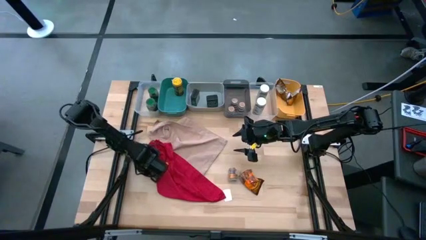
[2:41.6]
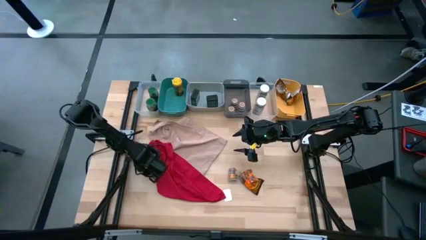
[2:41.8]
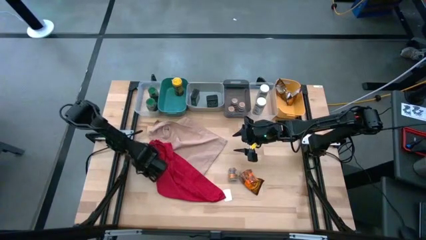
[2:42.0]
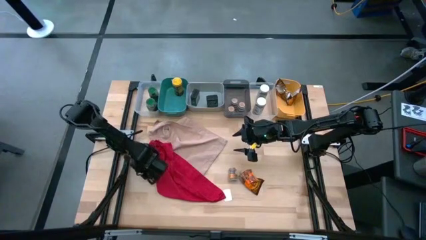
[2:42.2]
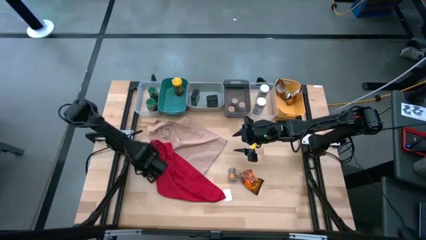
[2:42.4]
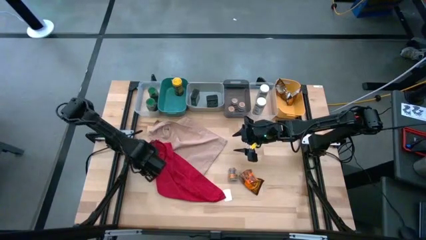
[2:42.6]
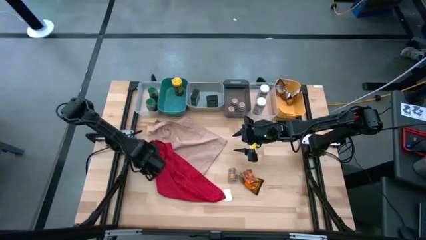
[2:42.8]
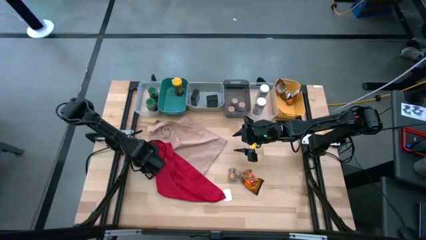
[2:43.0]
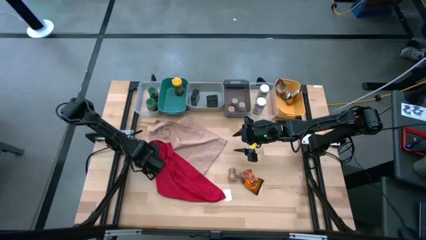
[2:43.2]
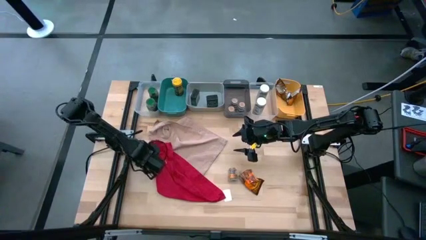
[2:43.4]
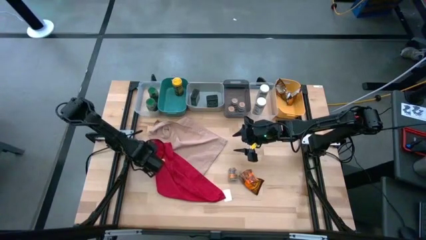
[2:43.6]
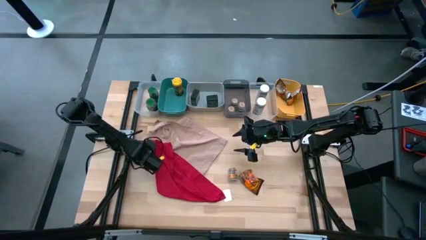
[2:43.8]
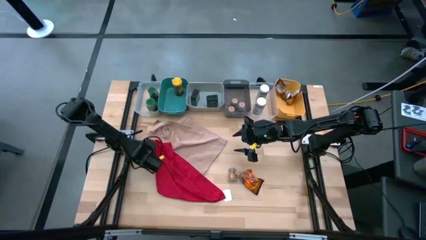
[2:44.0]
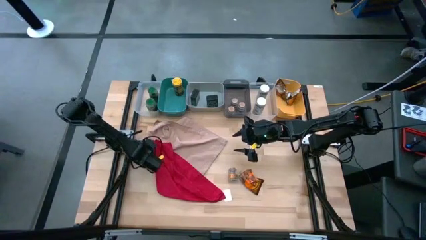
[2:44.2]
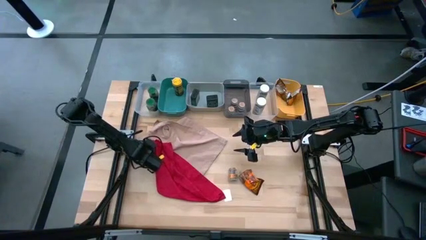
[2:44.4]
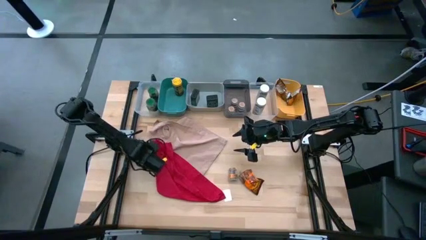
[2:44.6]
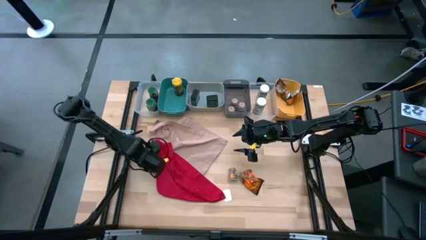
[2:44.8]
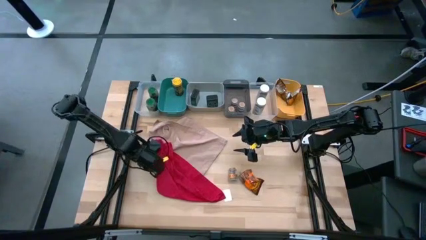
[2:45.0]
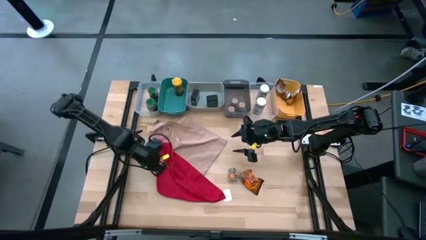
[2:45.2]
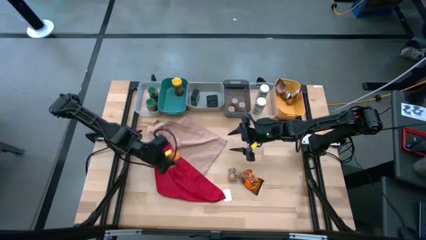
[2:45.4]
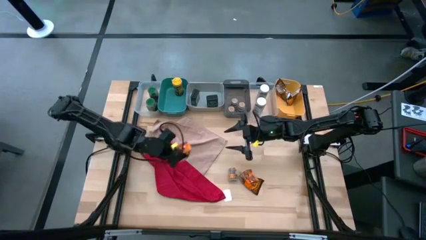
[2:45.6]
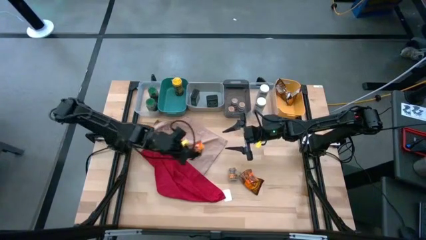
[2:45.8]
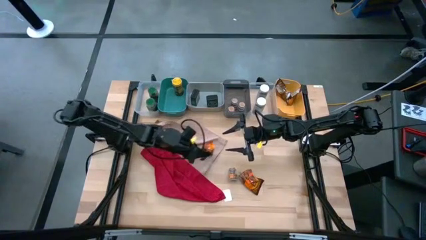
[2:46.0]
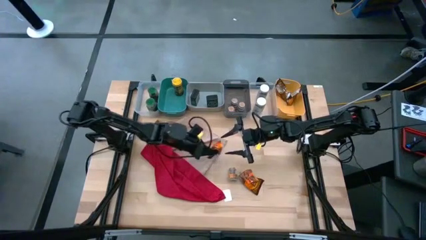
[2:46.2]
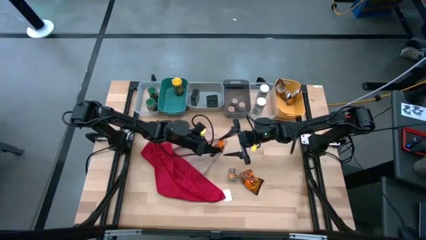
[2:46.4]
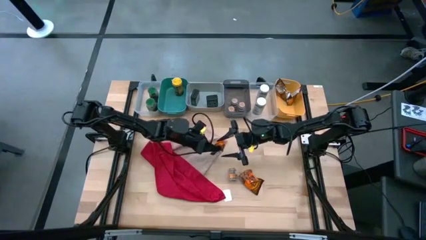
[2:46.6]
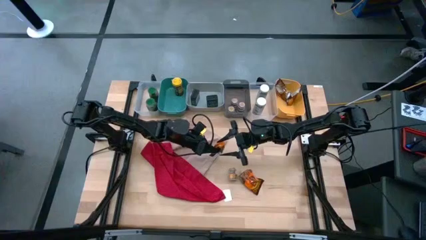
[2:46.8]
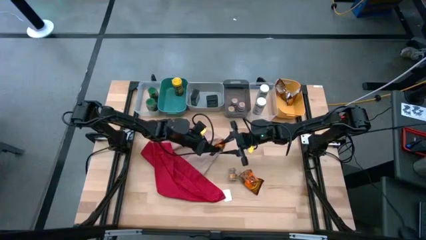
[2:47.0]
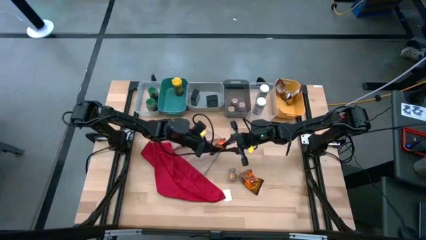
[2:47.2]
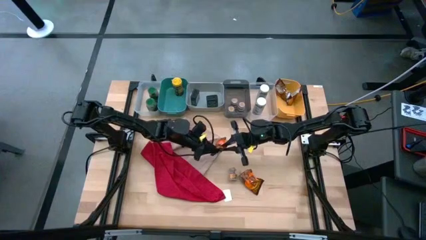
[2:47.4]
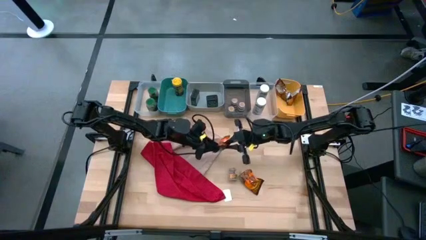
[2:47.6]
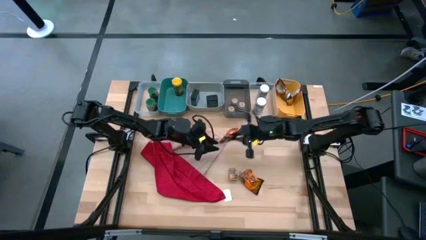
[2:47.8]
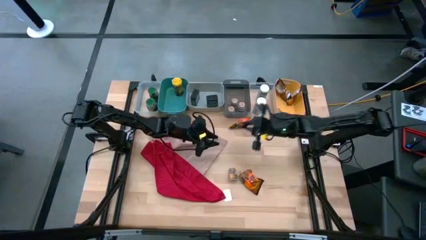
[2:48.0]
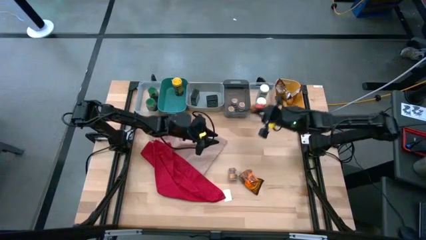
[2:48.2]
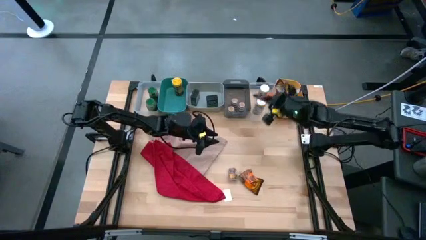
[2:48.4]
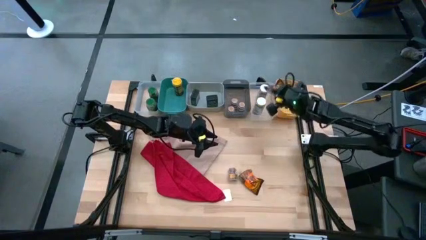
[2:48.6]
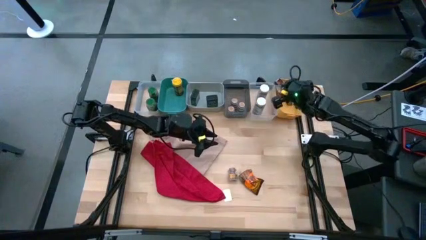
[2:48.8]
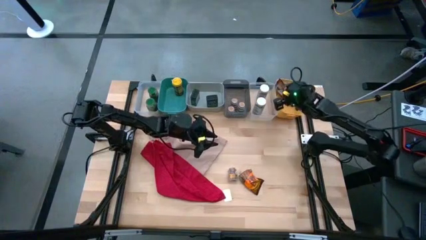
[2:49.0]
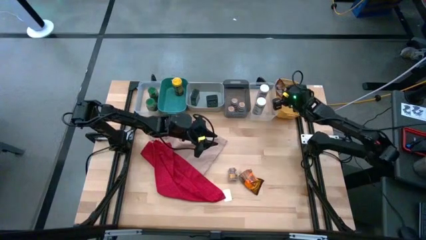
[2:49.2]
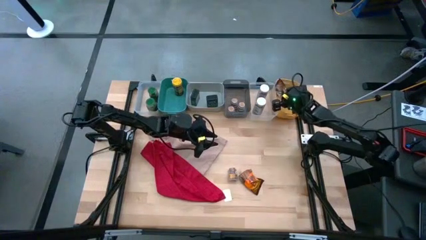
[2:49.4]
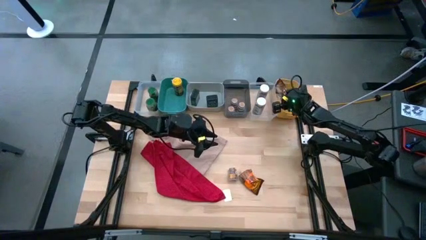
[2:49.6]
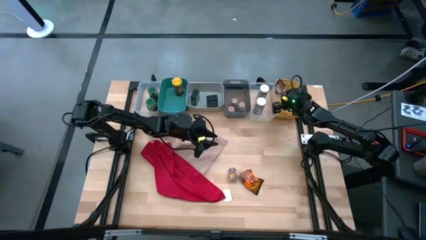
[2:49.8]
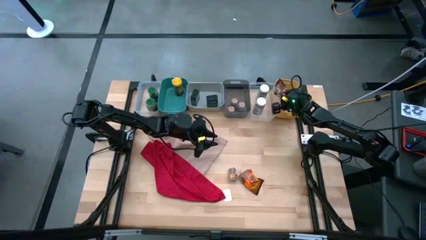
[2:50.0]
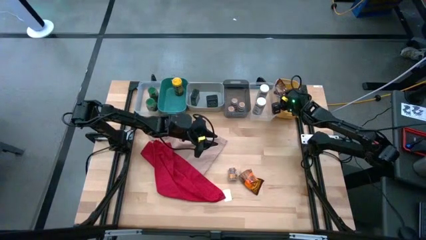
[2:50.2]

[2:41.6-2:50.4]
Task: Sort spices by type
Put the orange seasoning bag into the yellow bin

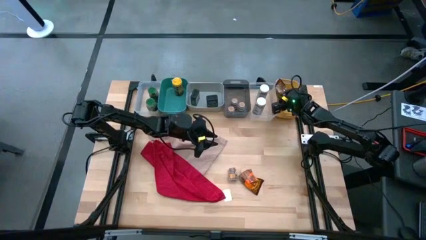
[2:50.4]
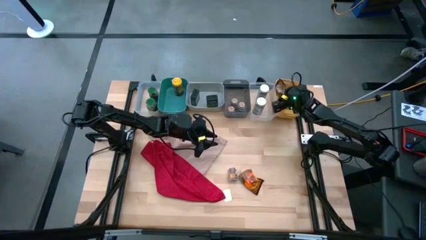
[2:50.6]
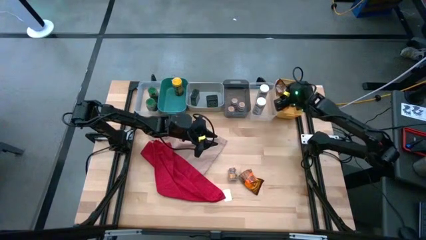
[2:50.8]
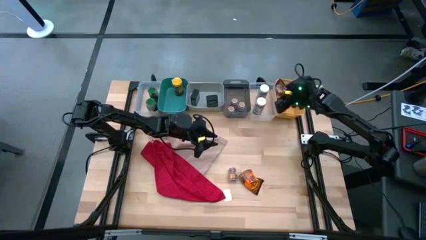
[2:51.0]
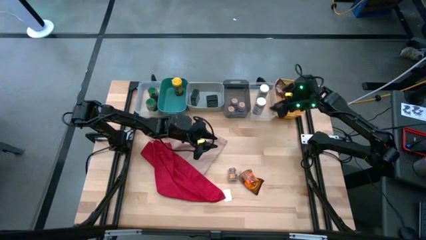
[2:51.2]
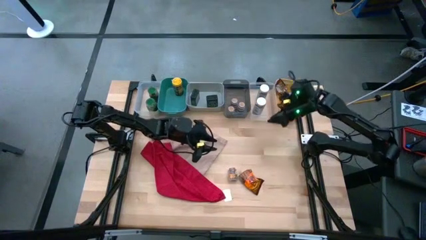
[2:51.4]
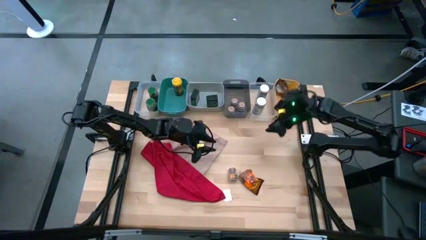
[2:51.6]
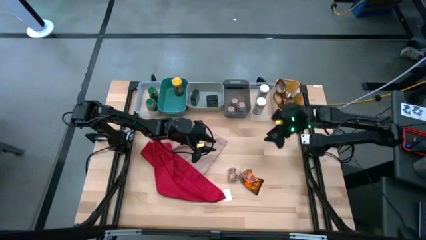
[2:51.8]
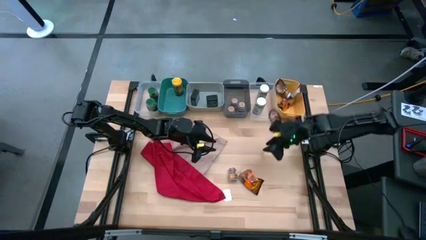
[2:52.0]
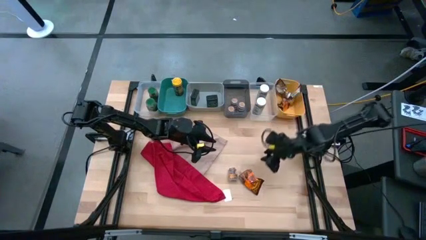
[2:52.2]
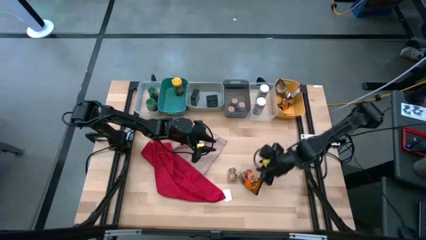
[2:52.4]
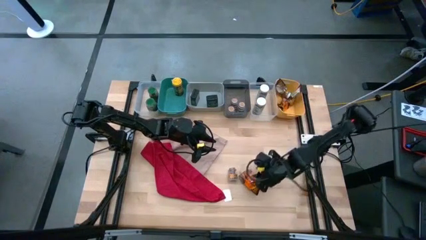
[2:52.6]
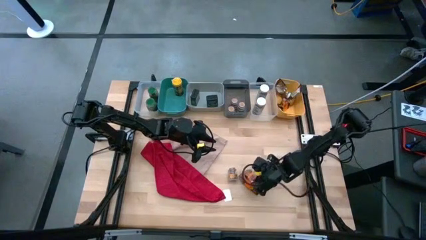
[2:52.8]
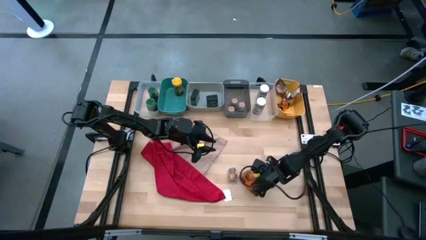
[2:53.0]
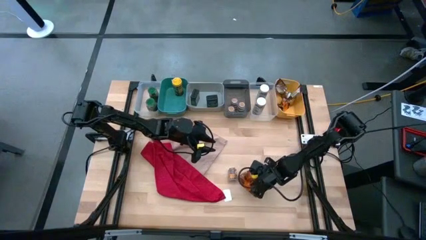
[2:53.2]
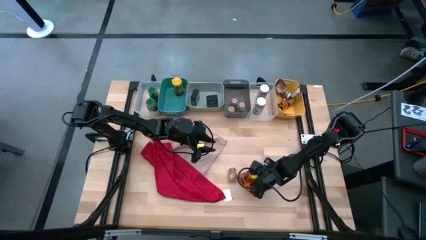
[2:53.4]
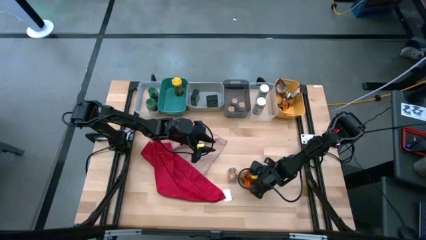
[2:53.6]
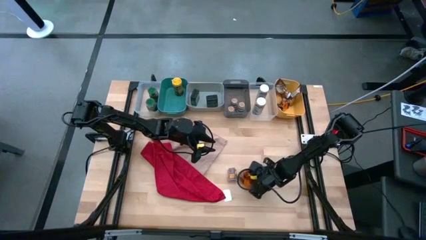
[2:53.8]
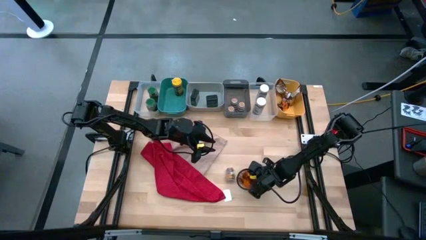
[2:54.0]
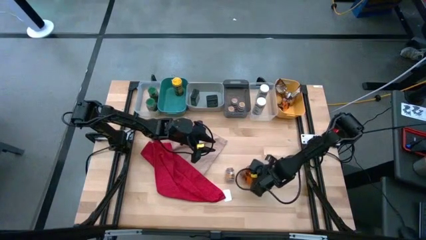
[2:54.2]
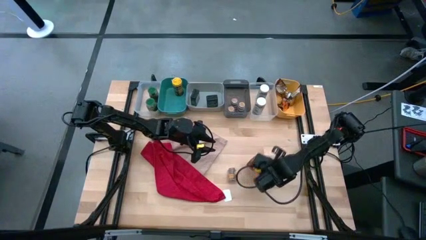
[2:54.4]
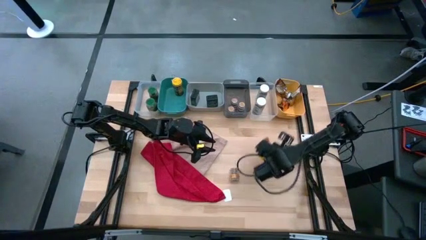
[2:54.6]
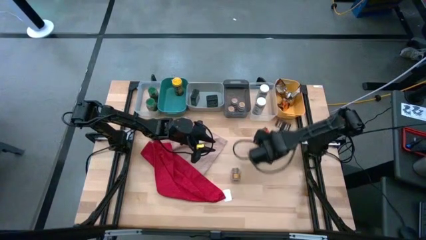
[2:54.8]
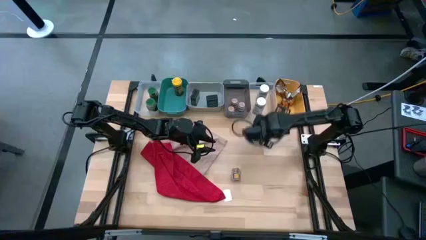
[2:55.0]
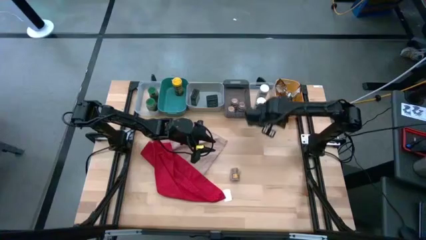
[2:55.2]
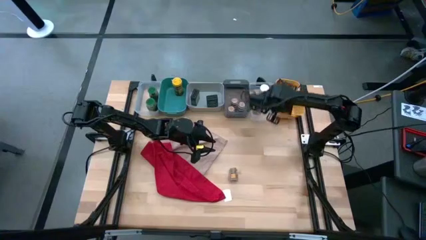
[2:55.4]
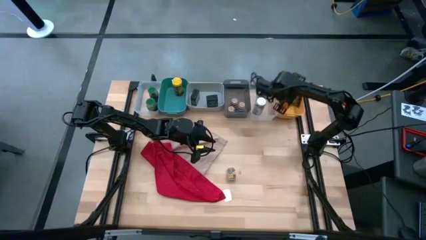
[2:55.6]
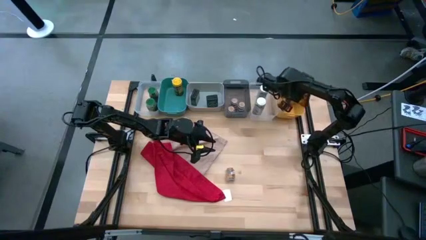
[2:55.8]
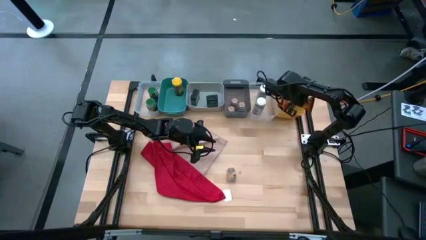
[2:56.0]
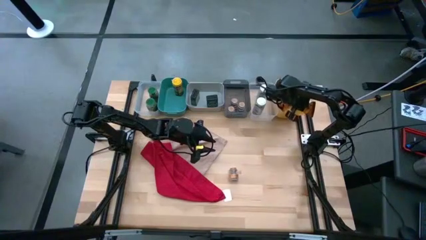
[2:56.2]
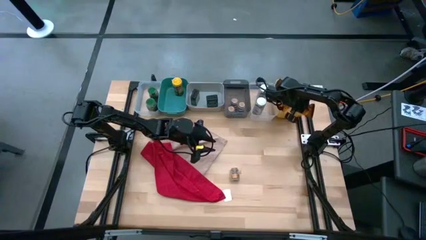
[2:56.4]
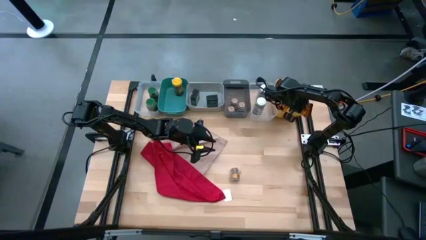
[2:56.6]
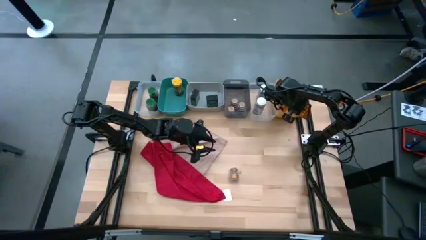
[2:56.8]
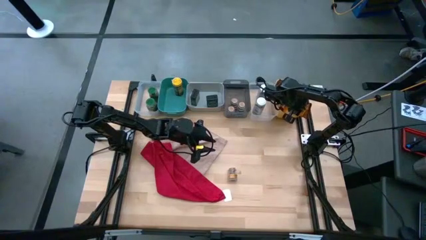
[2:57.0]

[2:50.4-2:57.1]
Put the orange seasoning bag into the yellow bin

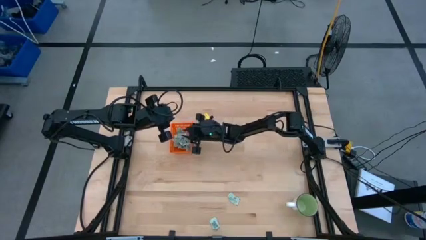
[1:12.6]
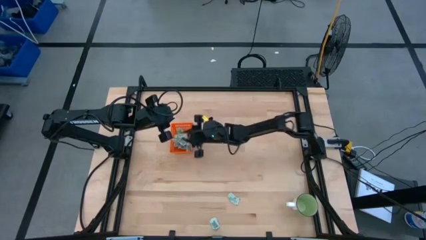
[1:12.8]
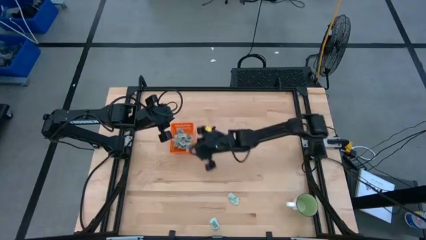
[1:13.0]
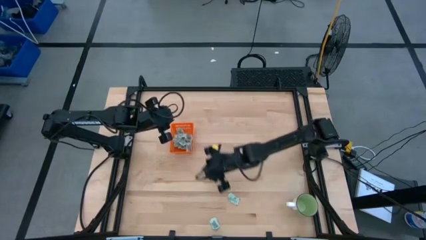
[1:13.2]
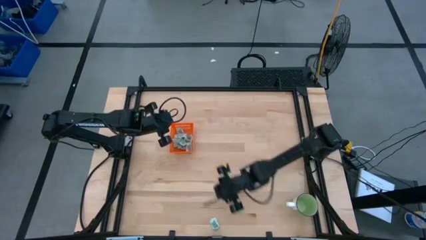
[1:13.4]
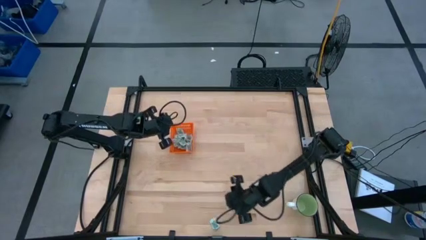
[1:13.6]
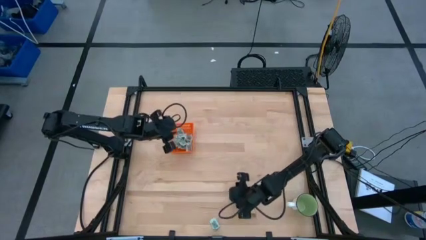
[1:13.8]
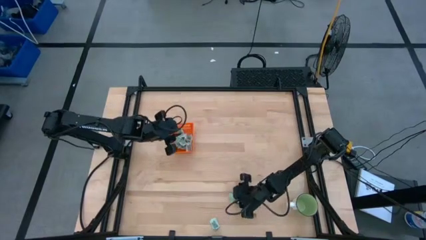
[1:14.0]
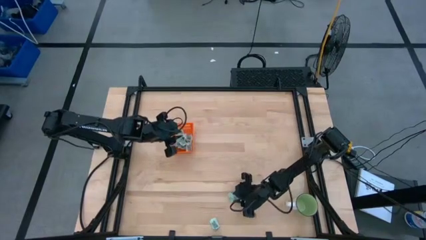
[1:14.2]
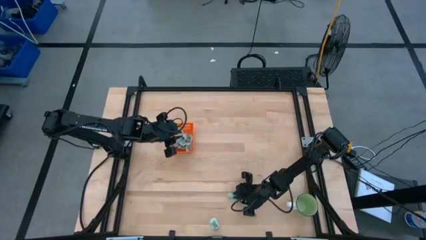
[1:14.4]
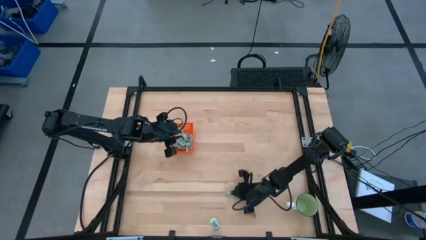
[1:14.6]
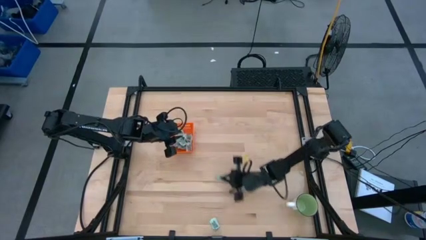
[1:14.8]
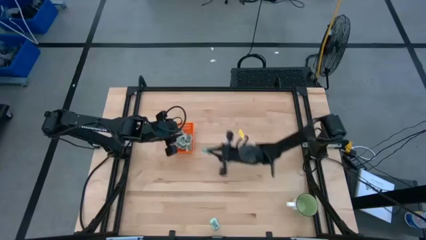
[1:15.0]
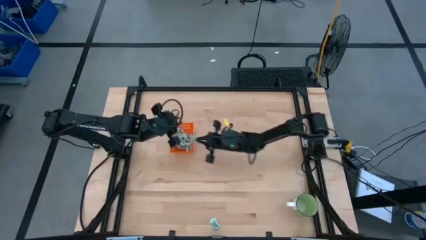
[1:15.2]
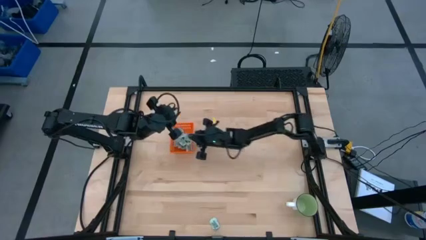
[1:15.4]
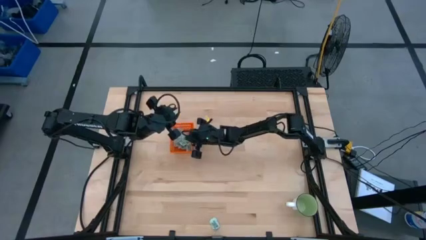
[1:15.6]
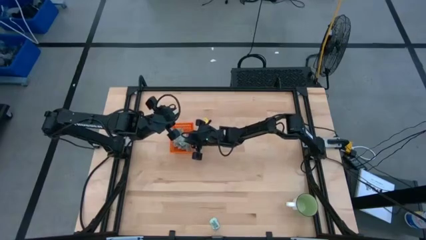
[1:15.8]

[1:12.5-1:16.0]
Task: Pick and place Stevia / Truvia into bins
Put the right green stevia packet into the orange bin
